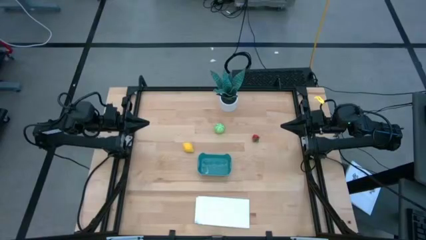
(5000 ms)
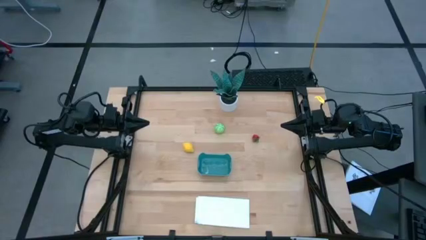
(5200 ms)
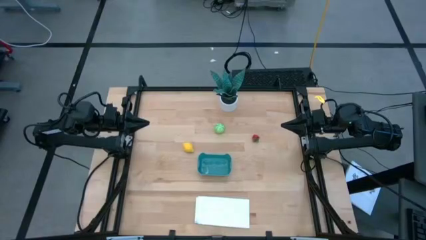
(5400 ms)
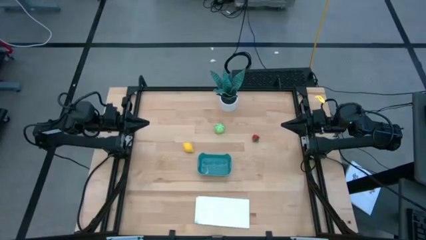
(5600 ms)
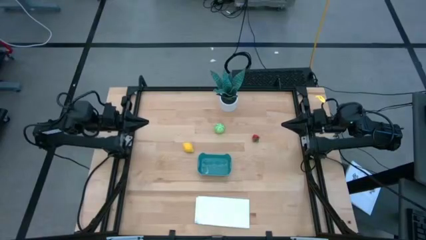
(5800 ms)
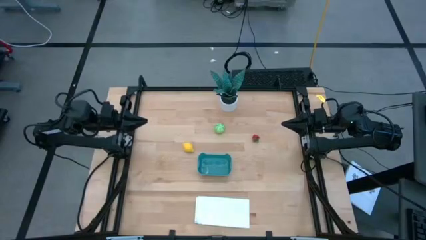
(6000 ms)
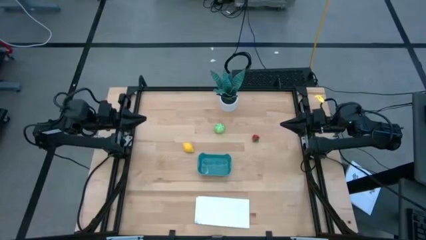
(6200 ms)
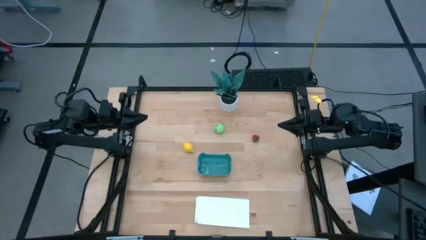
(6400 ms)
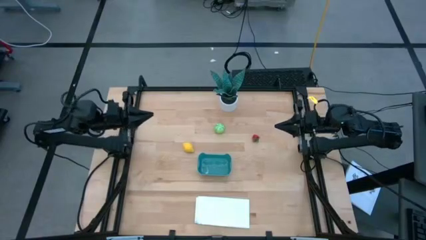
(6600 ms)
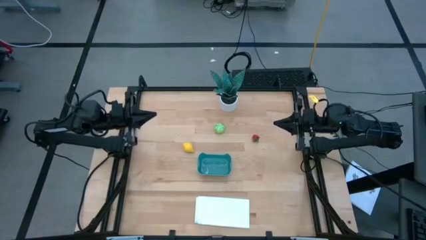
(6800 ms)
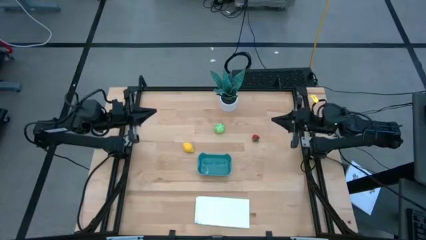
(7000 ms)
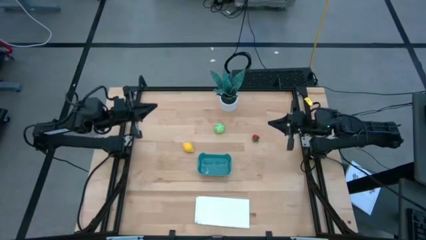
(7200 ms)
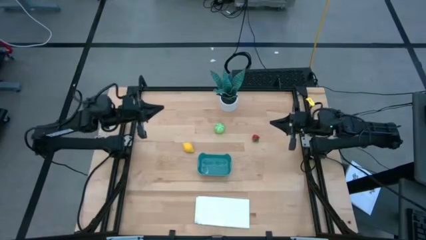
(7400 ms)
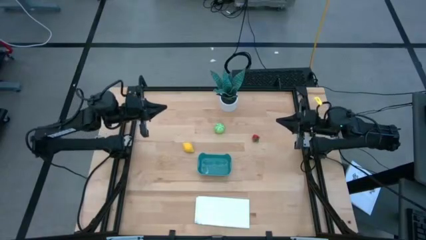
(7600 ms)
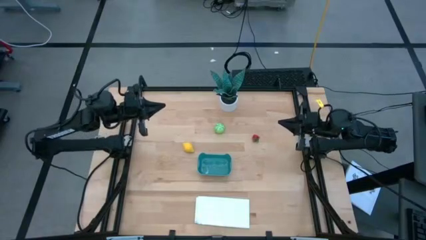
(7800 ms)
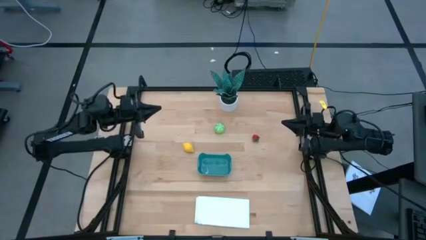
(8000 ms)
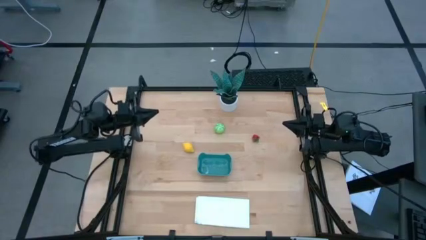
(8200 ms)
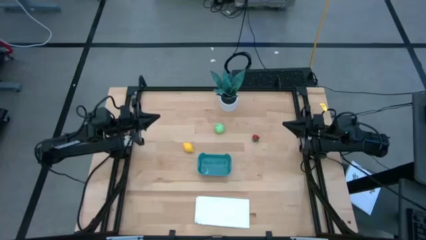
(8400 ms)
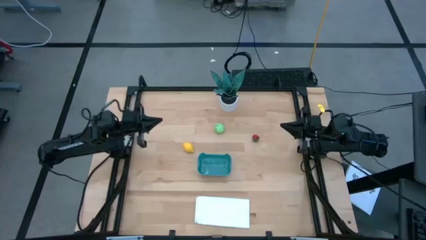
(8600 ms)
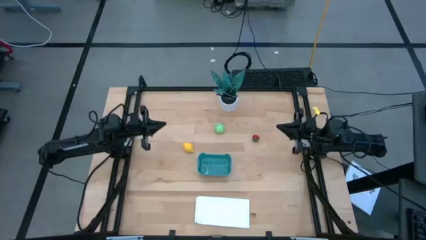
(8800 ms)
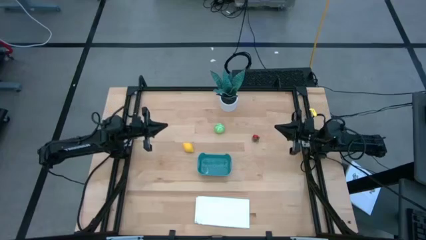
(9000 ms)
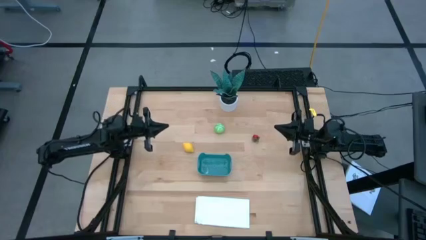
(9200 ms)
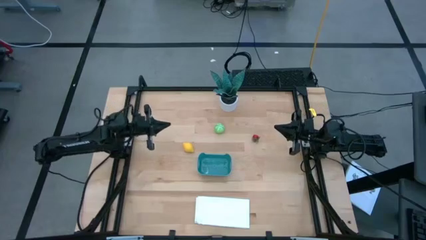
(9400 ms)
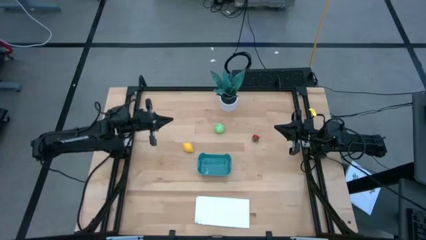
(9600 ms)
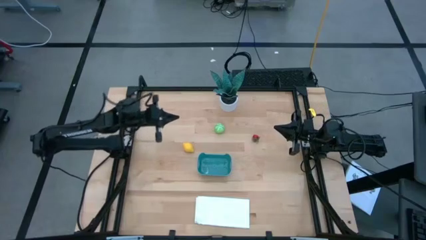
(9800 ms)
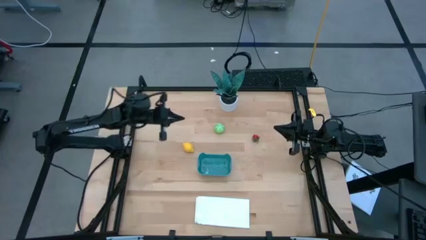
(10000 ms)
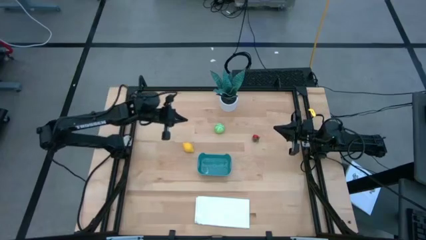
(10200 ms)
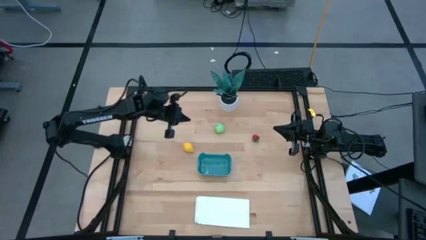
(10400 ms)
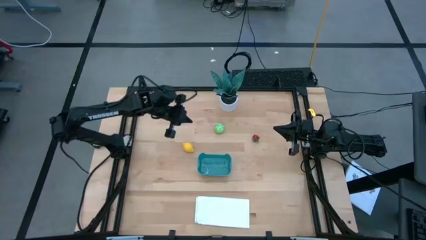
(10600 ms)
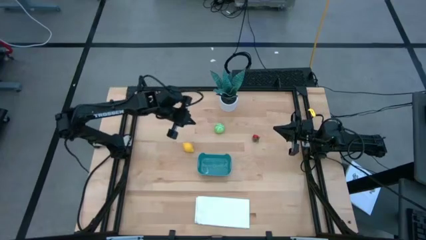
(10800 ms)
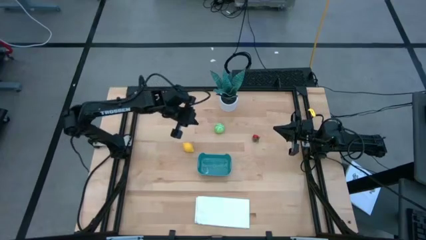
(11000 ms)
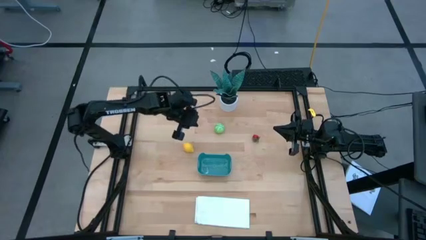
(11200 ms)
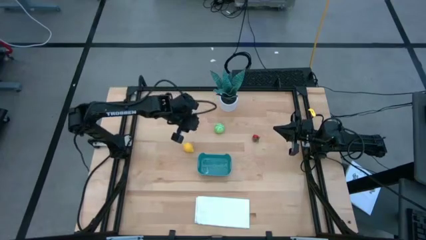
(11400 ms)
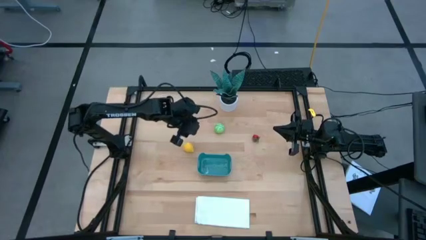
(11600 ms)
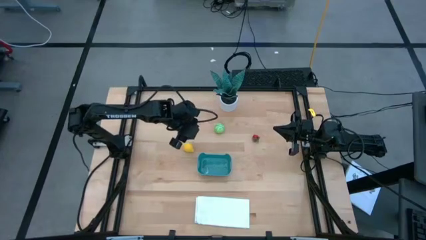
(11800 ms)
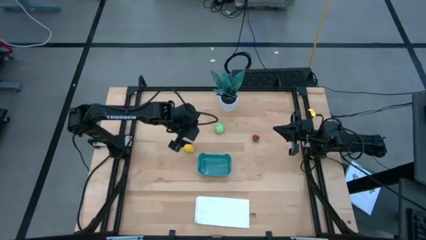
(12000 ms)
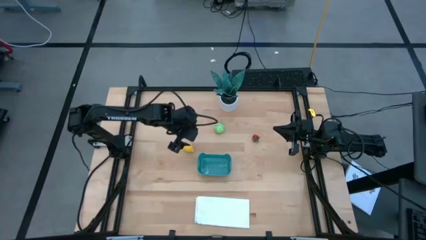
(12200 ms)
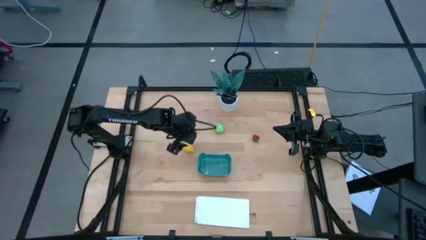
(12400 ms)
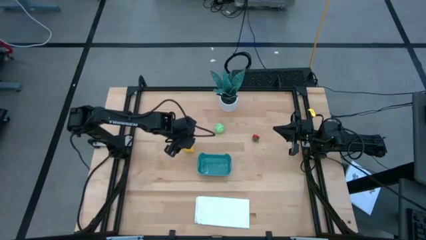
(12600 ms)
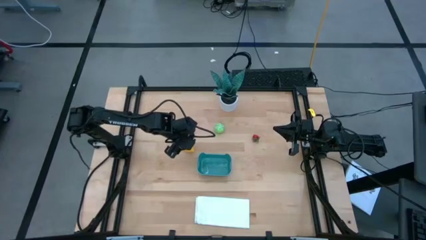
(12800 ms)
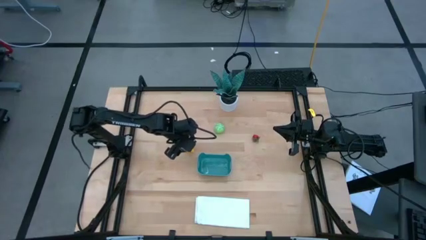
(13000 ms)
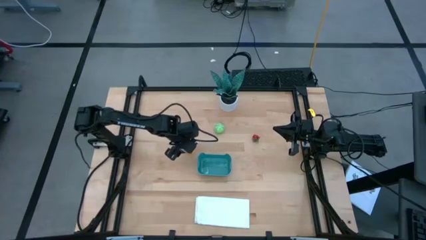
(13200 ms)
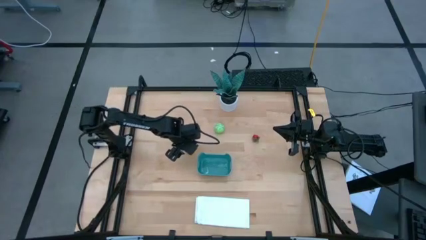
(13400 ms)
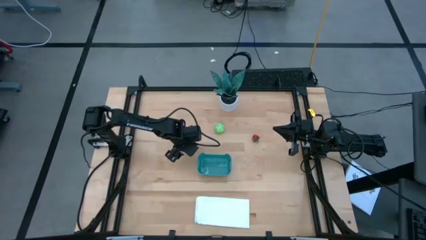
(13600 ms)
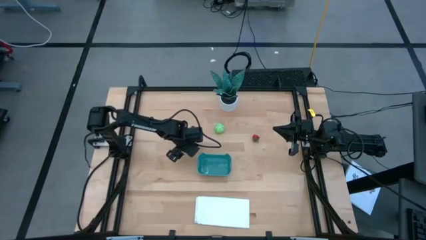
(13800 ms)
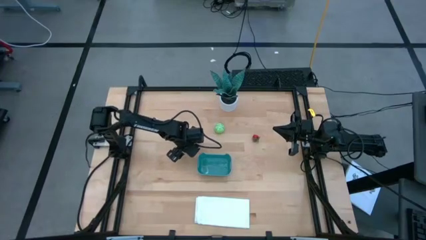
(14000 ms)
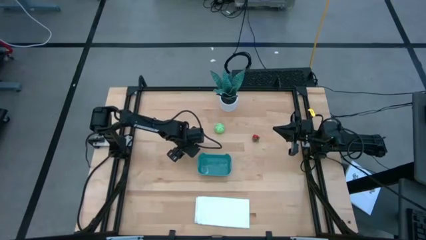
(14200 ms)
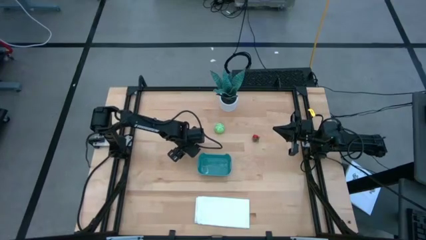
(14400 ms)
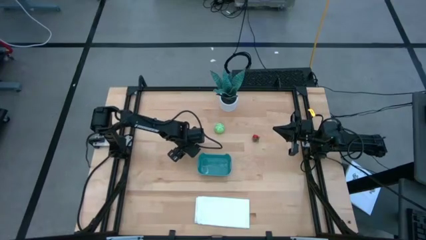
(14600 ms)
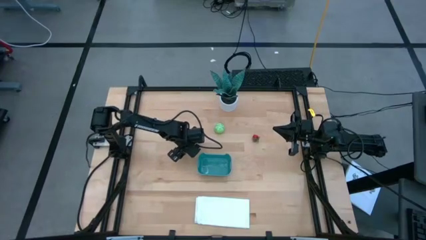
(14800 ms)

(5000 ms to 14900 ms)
Task: Pick and placing Produce into tupperware
Put the yellow lemon into the blue basket

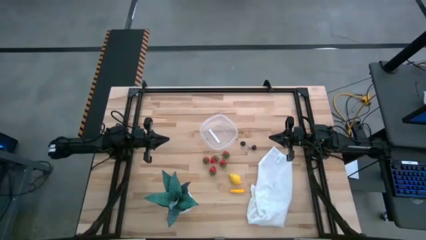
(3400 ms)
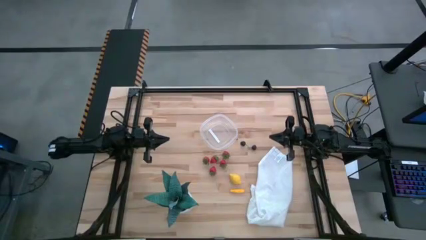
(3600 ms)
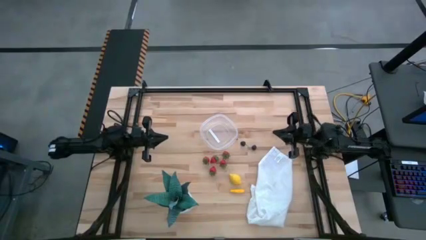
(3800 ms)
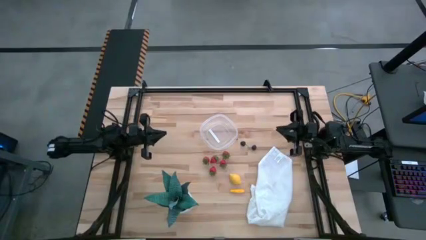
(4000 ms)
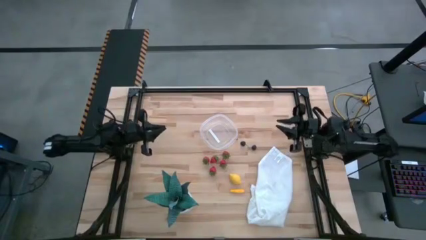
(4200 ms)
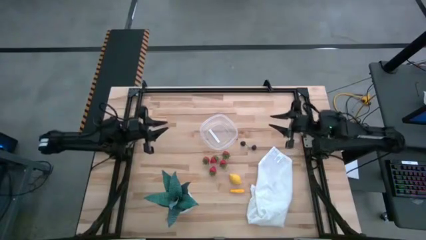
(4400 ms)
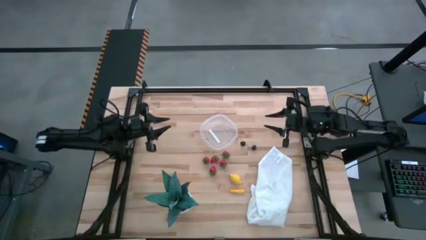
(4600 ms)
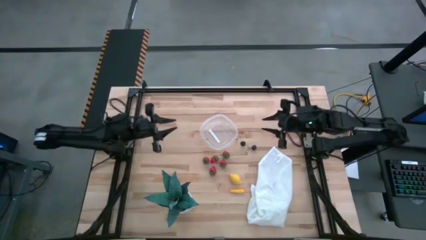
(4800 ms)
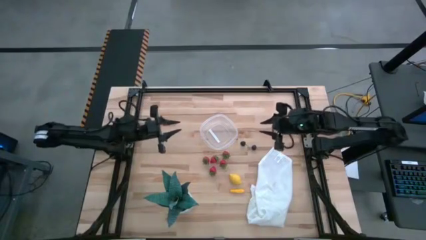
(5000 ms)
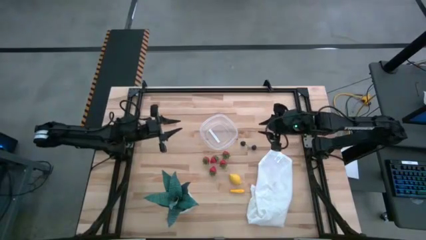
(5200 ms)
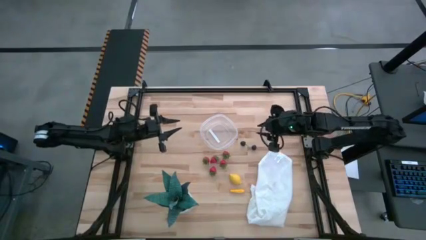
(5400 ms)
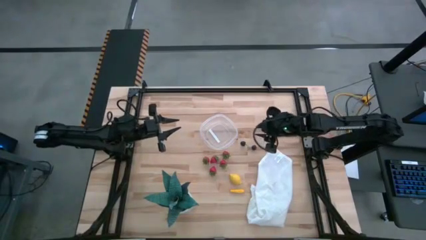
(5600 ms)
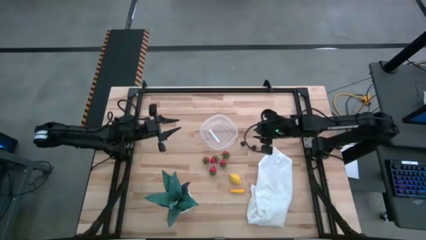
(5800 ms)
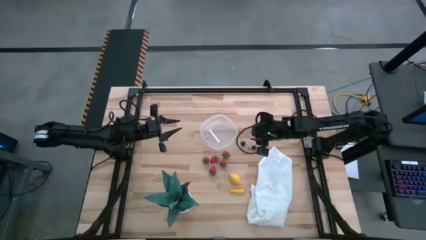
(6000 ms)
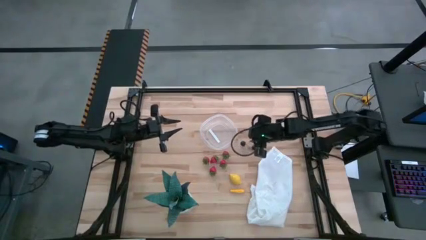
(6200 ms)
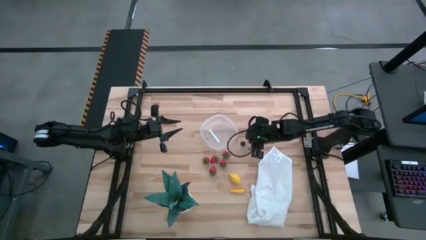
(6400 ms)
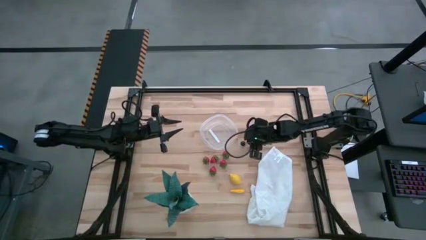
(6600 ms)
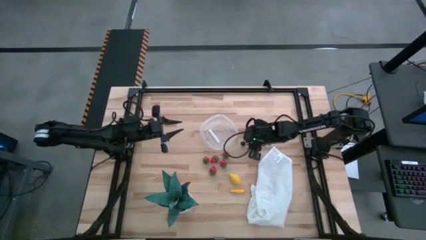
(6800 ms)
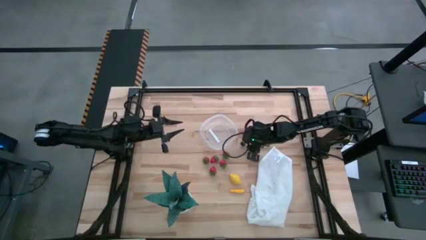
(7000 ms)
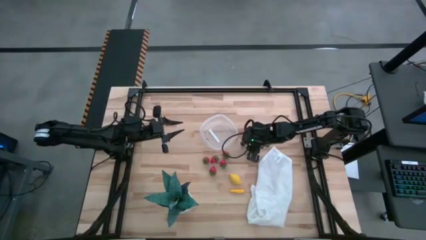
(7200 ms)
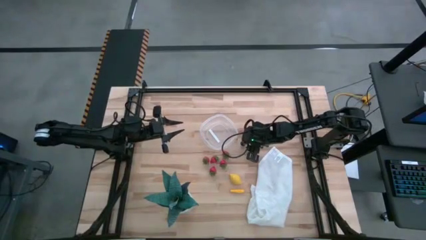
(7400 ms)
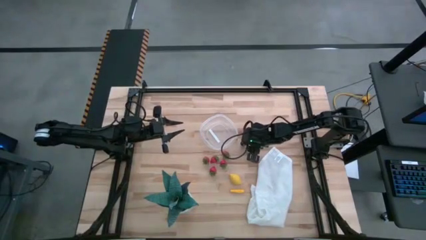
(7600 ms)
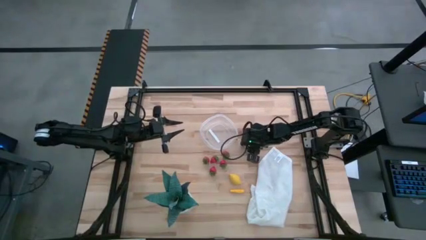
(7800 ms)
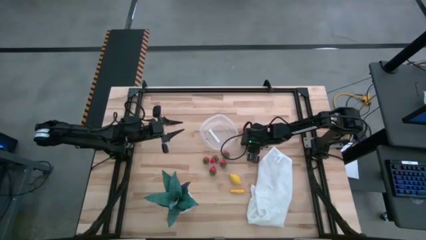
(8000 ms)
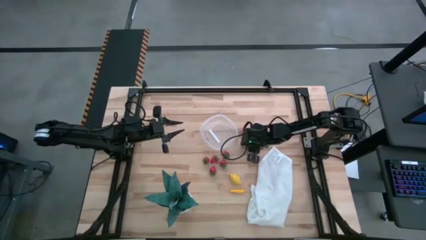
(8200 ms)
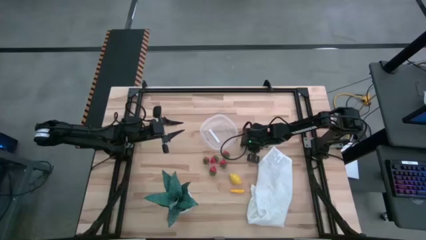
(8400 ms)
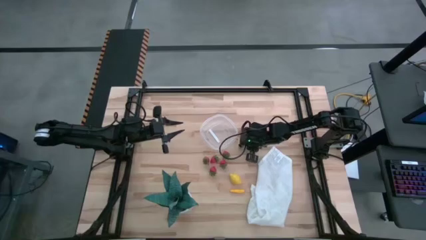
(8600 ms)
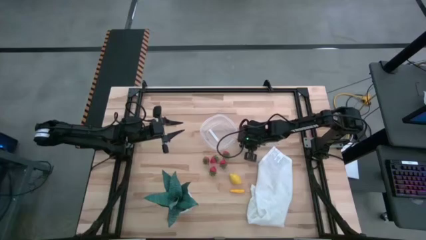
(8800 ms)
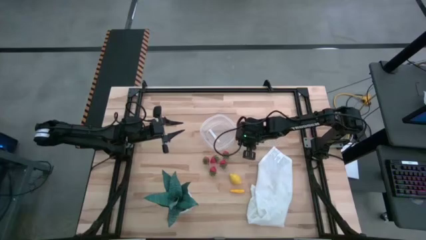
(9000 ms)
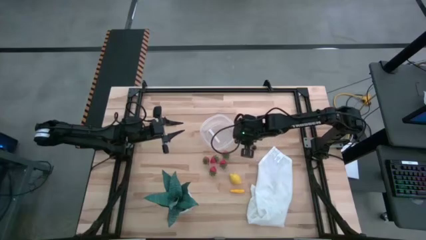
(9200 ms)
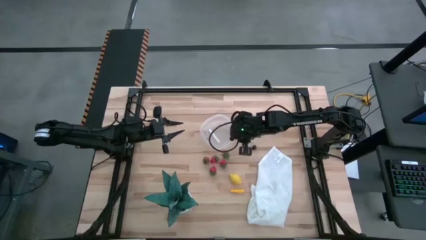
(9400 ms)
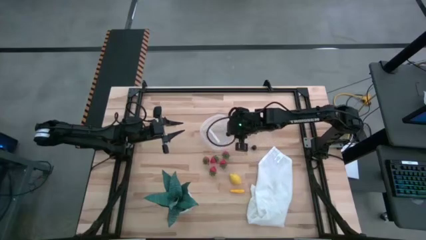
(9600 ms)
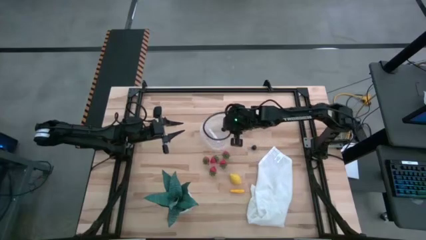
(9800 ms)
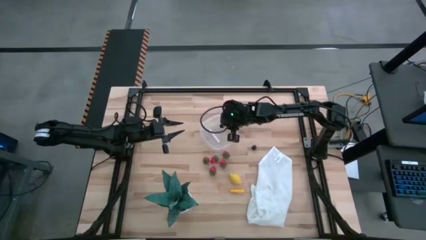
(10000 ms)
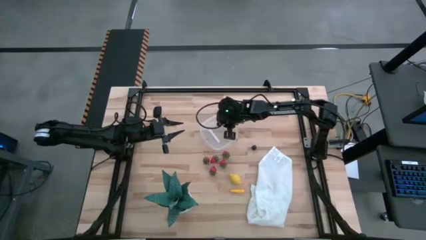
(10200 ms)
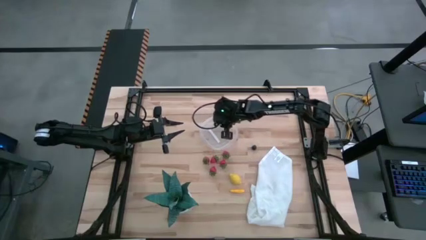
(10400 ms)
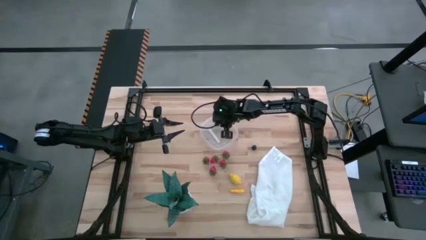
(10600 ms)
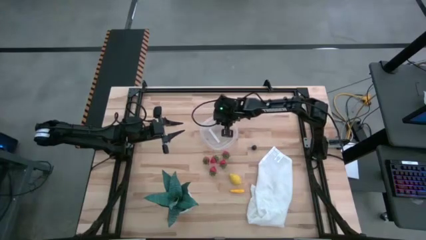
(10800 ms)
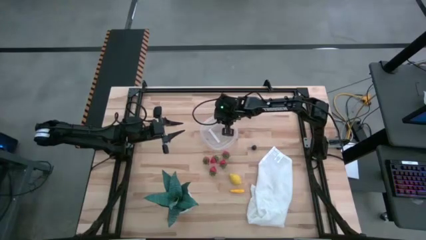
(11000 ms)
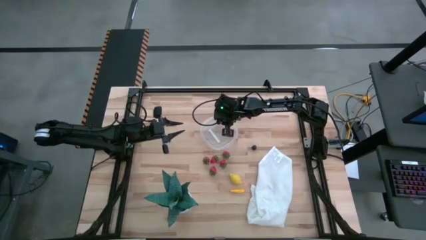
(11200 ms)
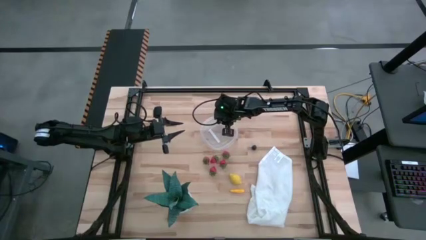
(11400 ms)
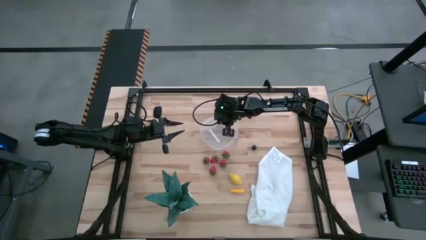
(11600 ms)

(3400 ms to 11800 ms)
Task: Pick and placing Produce into tupperware
Put the black cherry into the bin
